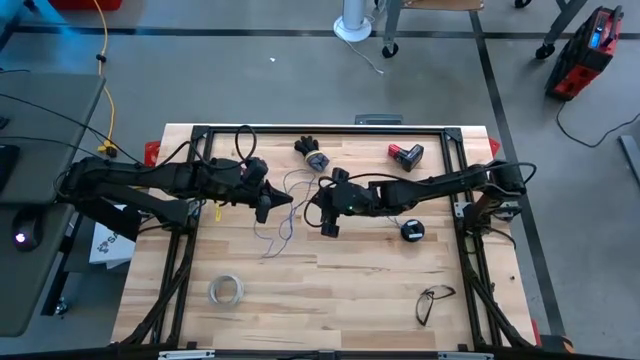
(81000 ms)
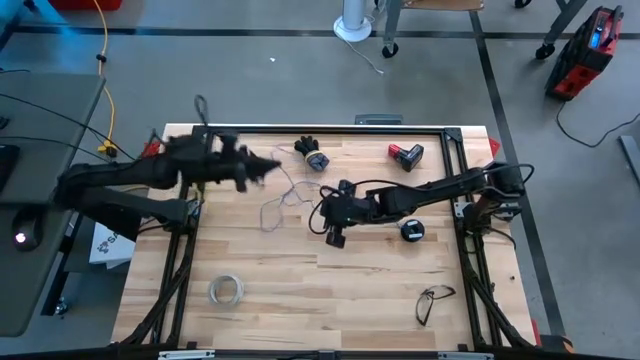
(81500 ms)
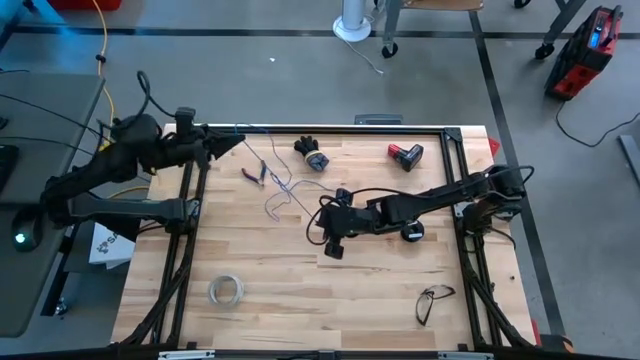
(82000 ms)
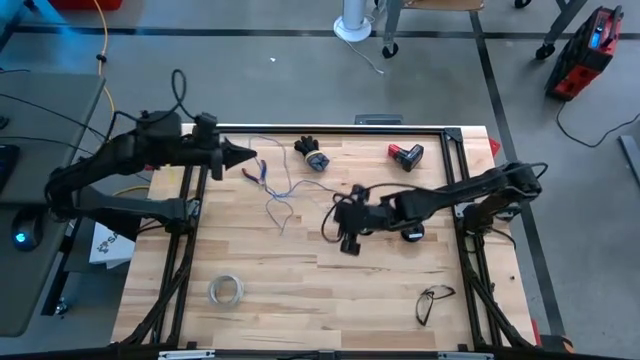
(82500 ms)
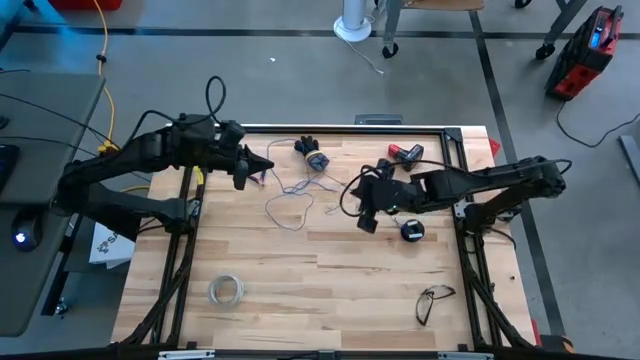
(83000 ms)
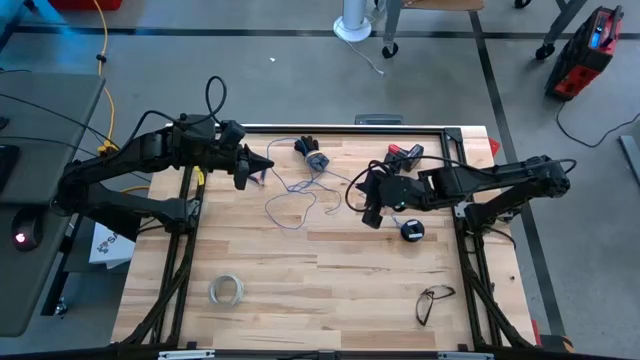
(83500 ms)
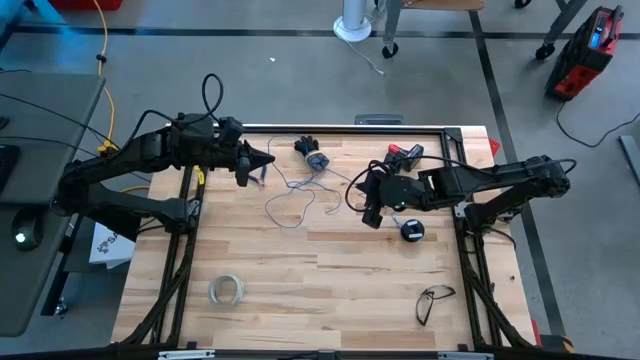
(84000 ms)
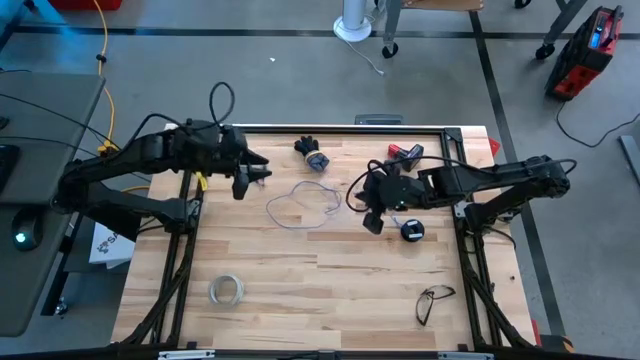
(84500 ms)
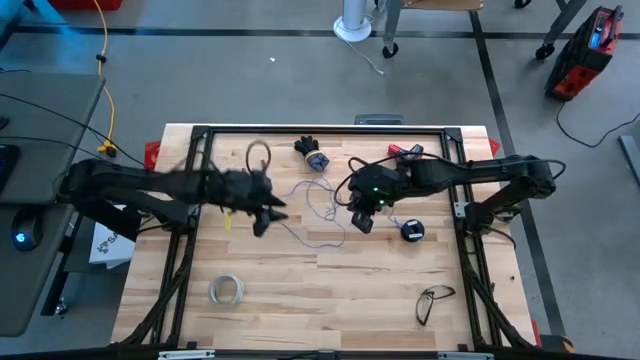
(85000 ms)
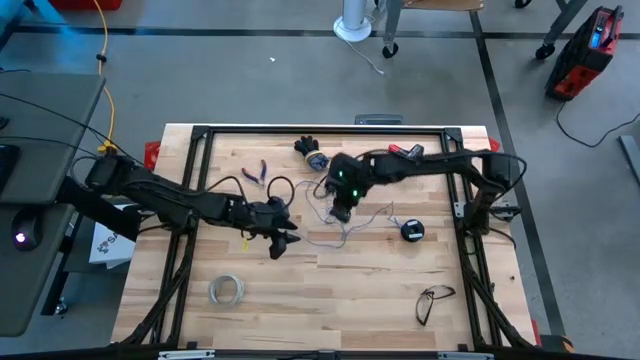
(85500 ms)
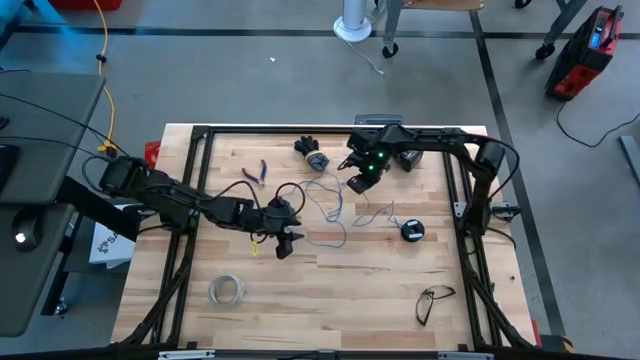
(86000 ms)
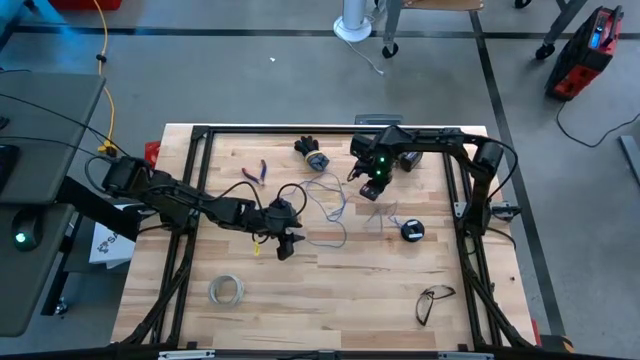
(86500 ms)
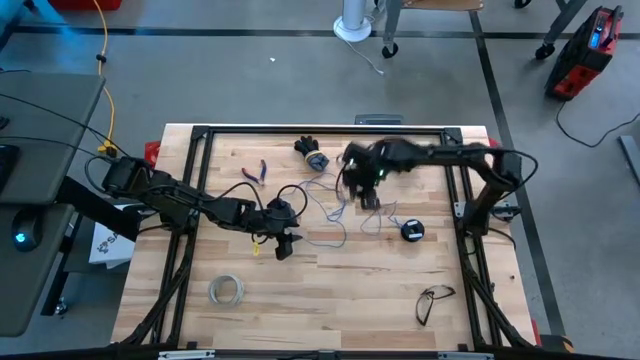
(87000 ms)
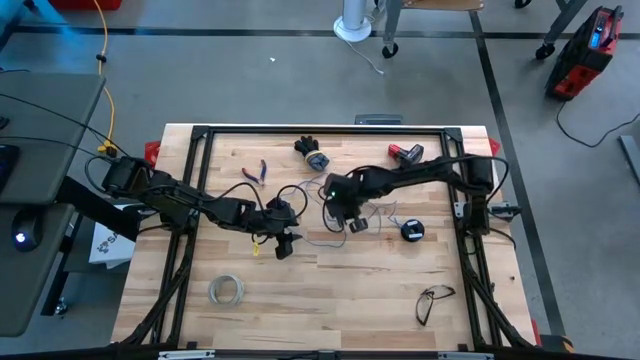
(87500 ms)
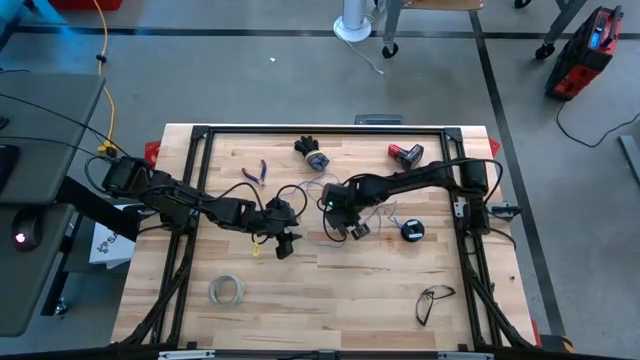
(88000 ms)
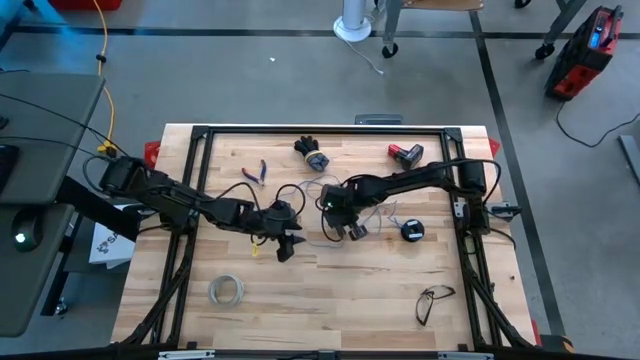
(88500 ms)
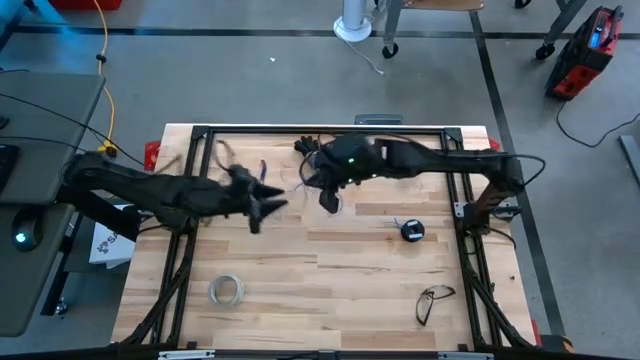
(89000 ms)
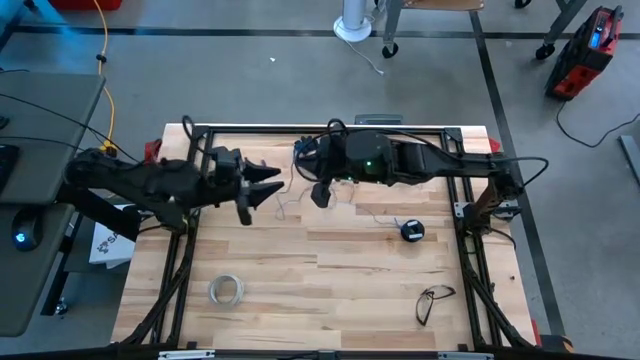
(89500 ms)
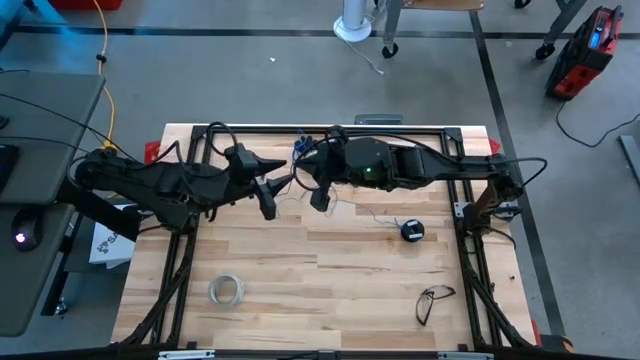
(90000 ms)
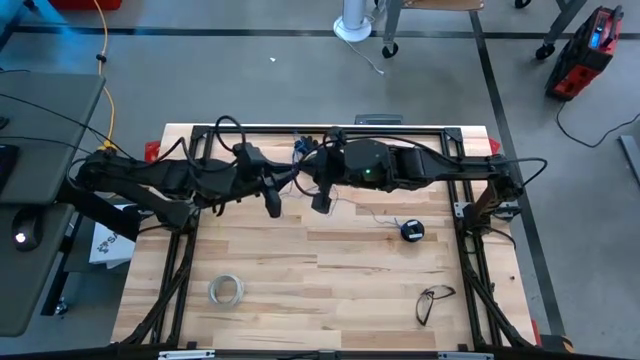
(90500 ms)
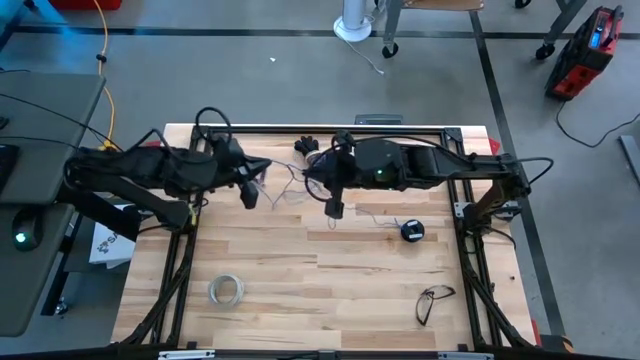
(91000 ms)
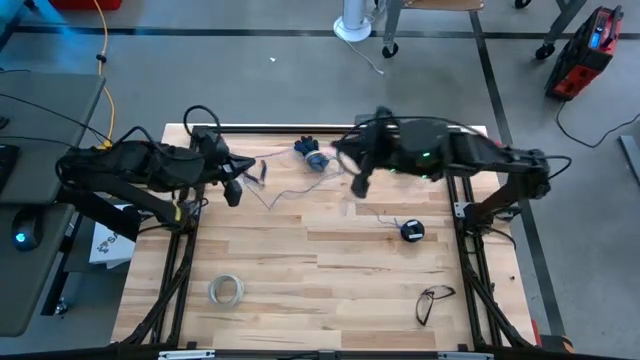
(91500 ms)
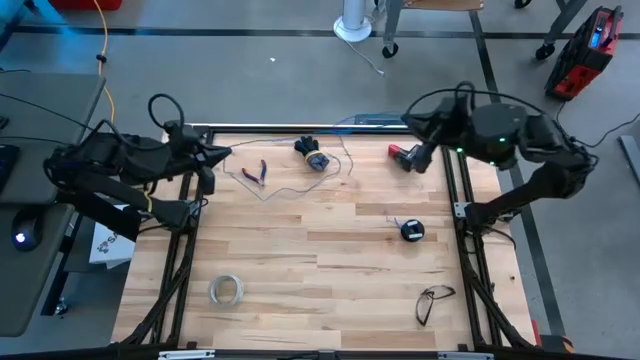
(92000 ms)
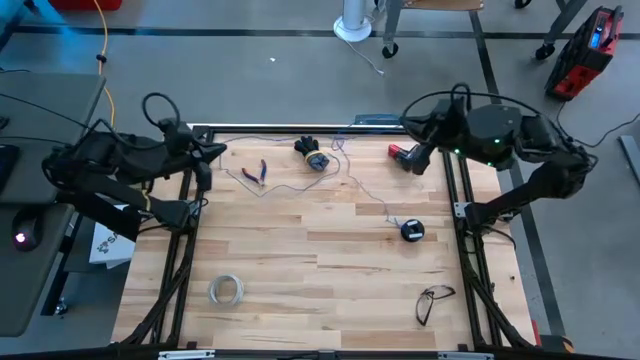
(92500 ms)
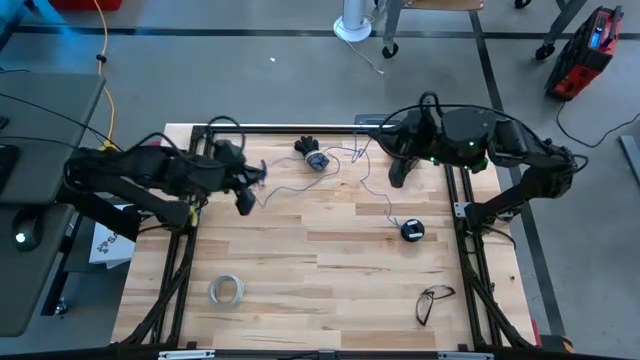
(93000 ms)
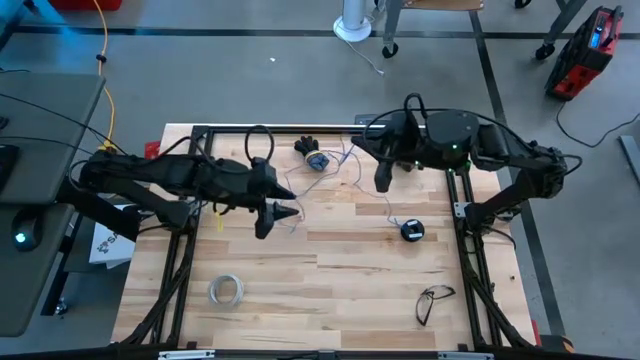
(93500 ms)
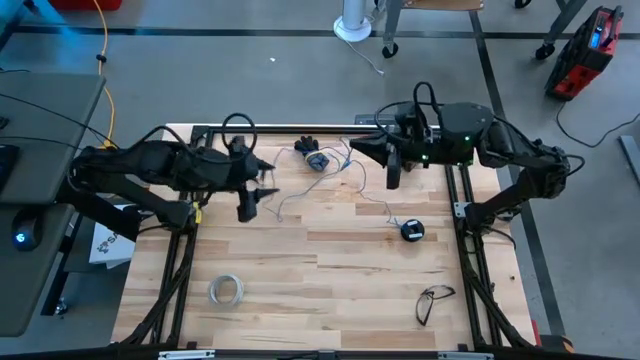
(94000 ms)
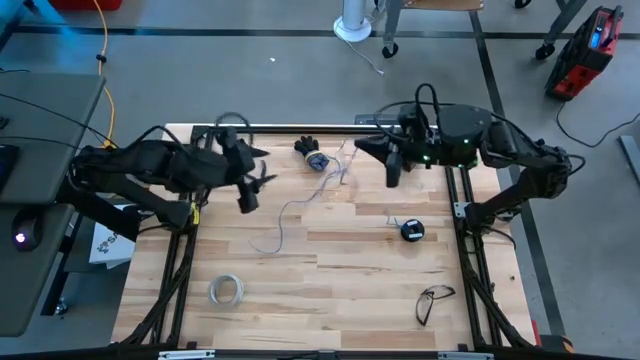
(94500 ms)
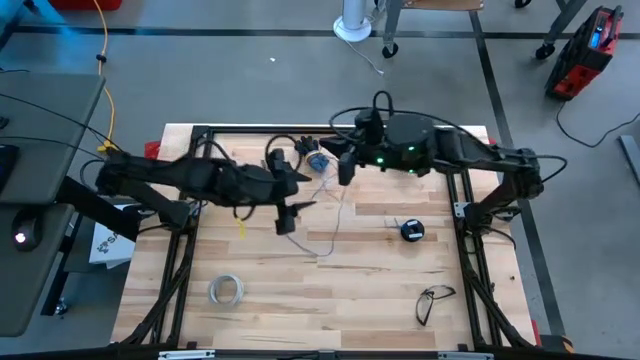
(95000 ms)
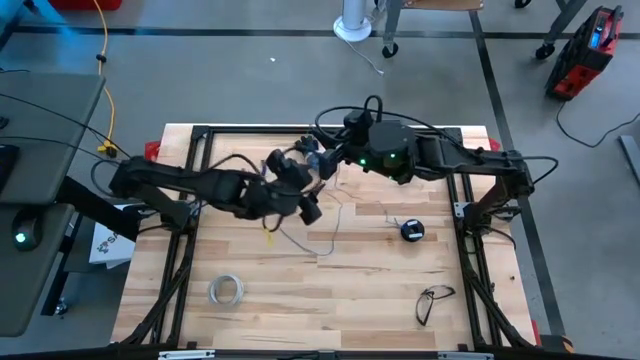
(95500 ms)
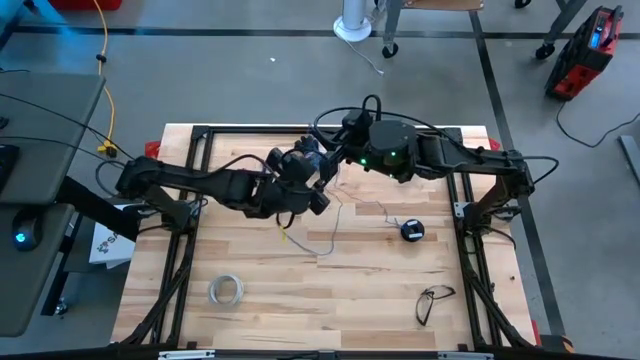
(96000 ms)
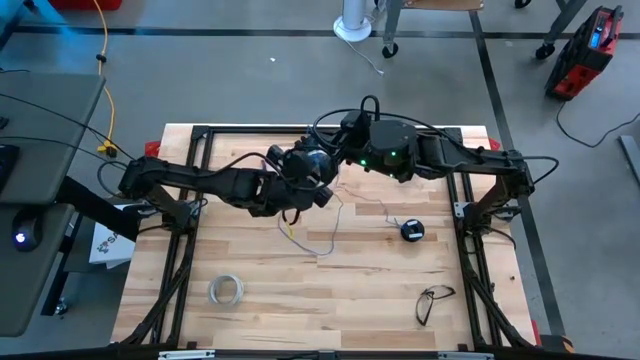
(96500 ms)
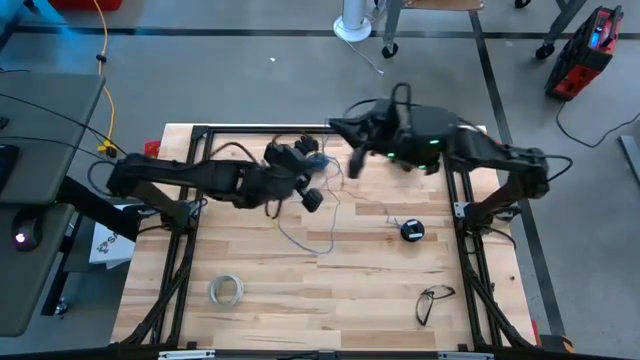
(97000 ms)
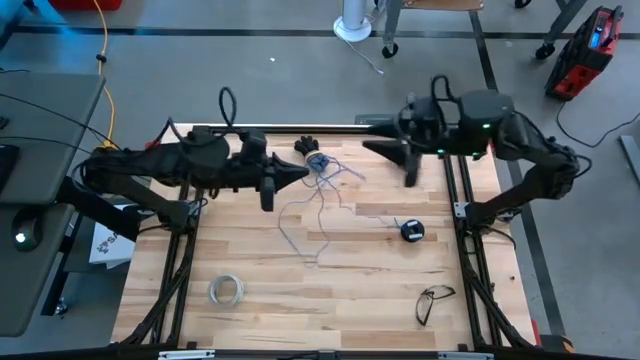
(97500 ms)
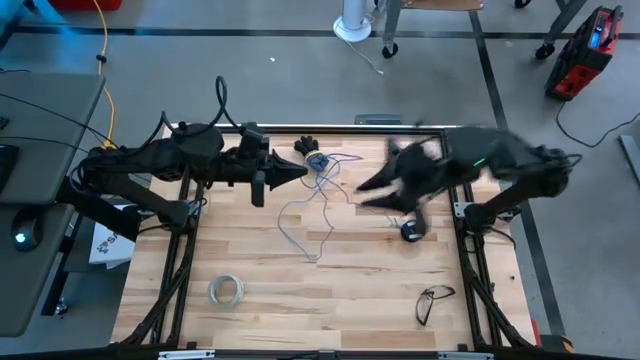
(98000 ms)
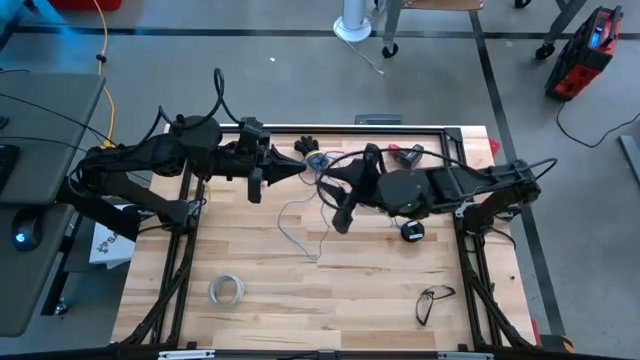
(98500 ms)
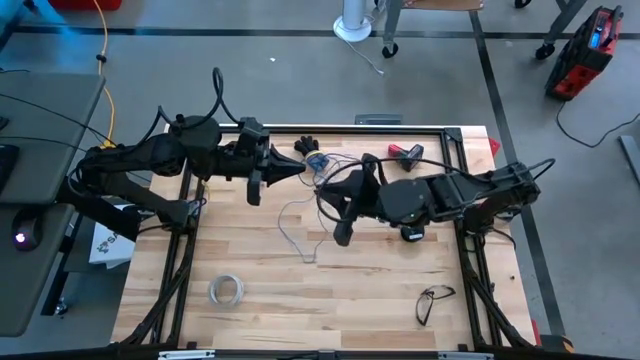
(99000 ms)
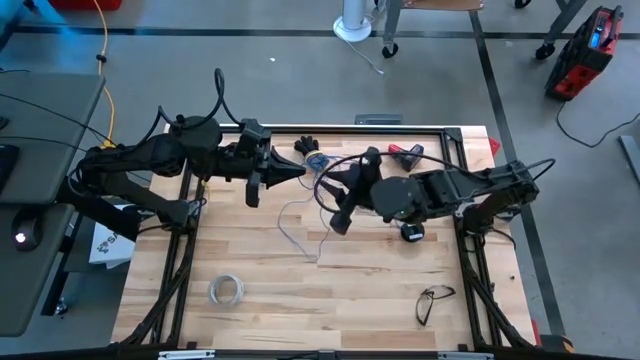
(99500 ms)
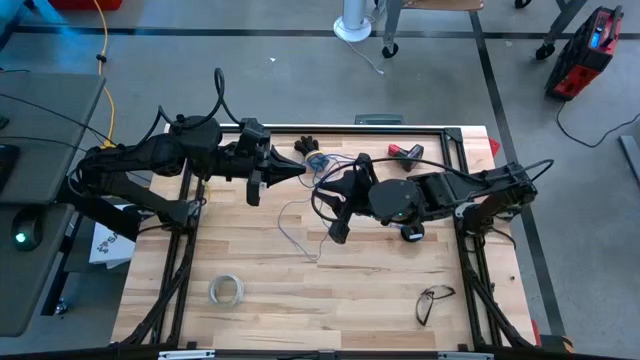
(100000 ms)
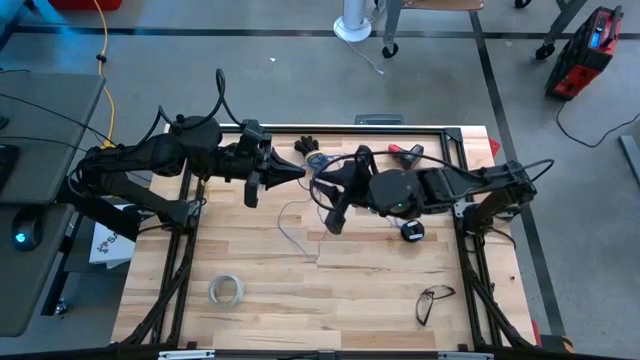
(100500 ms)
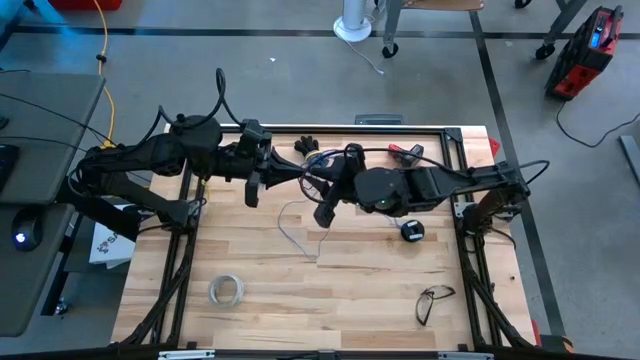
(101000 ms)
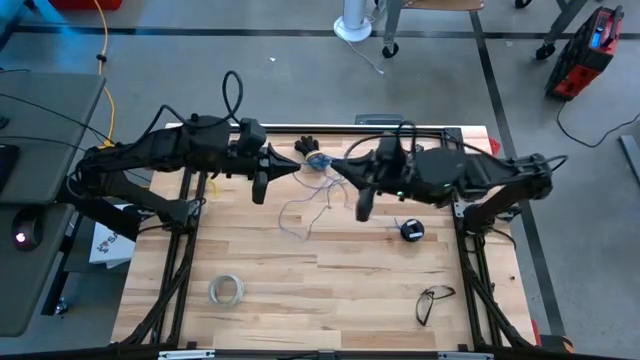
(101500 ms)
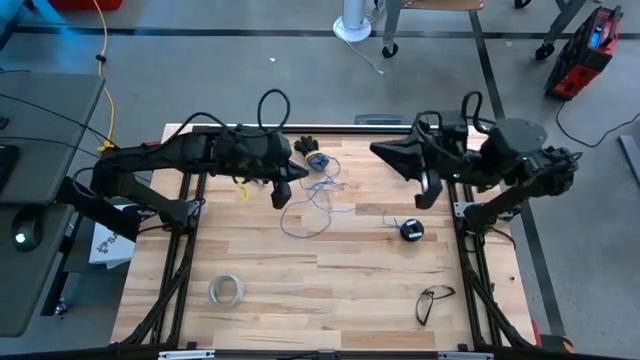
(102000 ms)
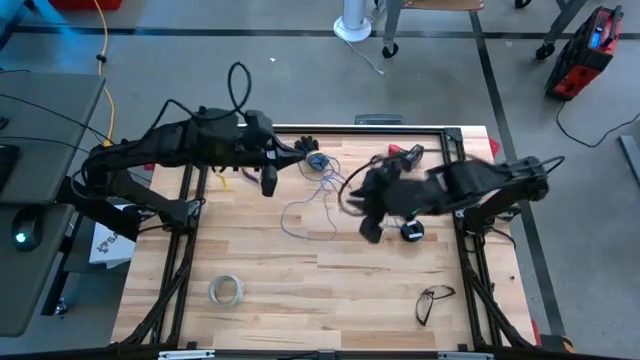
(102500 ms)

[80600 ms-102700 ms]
Task: Coil cords
Uncoil the blue wire from the black spool
